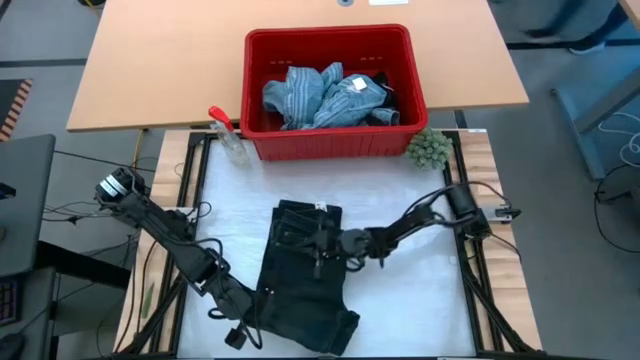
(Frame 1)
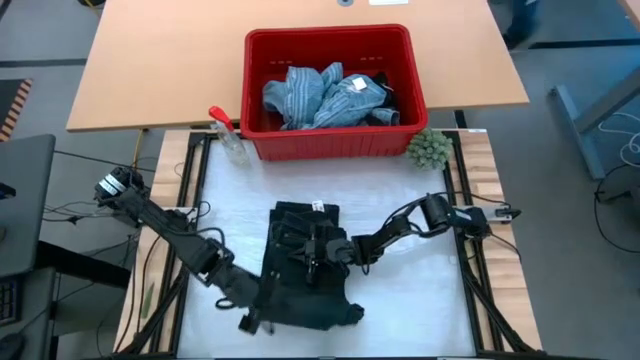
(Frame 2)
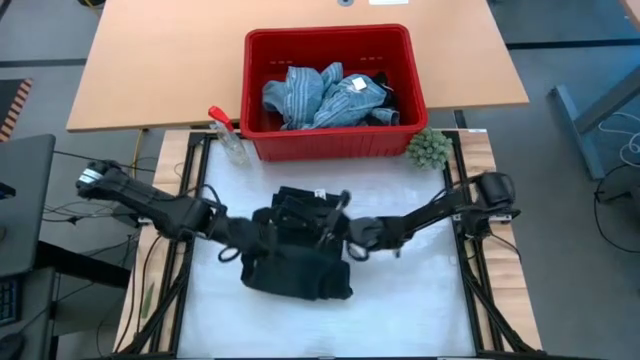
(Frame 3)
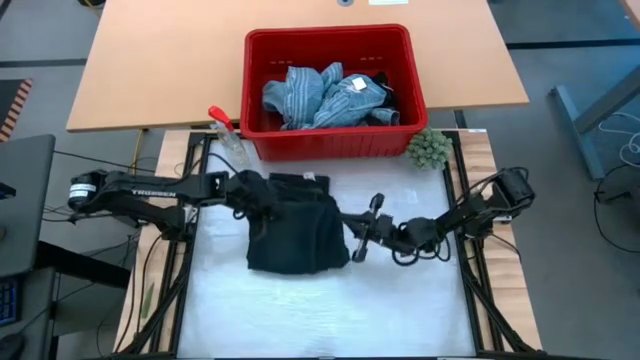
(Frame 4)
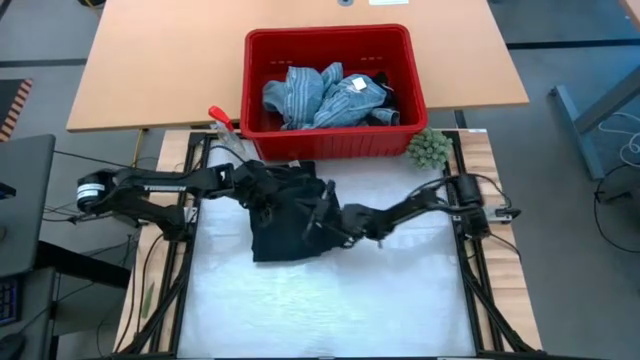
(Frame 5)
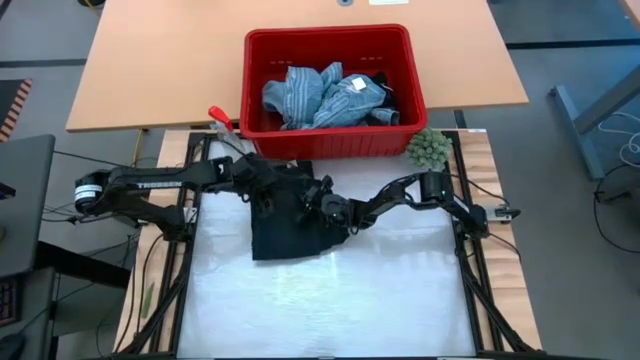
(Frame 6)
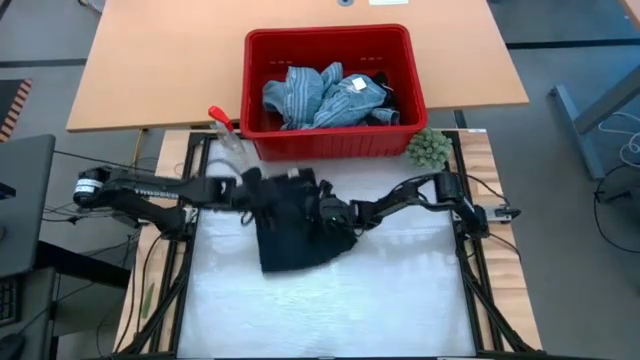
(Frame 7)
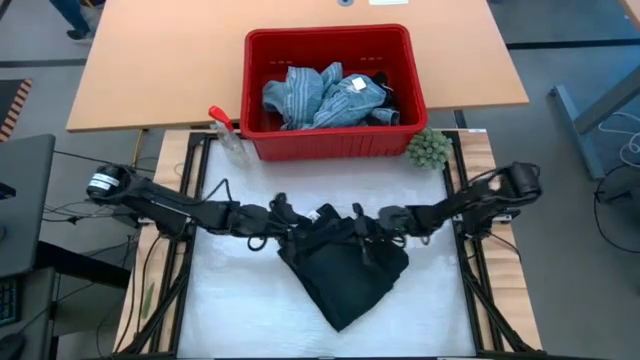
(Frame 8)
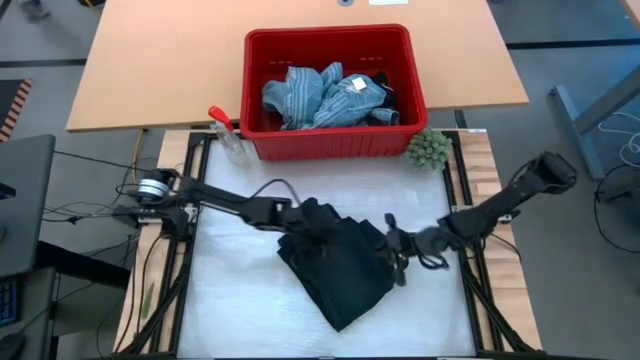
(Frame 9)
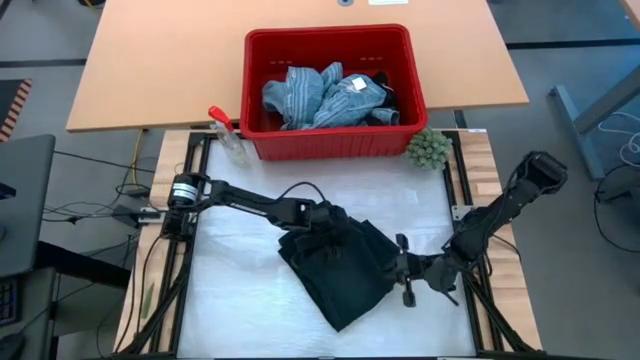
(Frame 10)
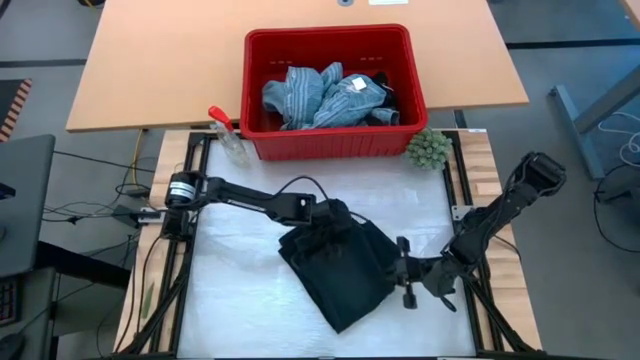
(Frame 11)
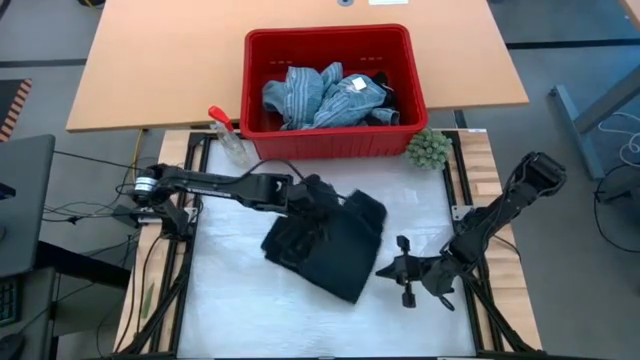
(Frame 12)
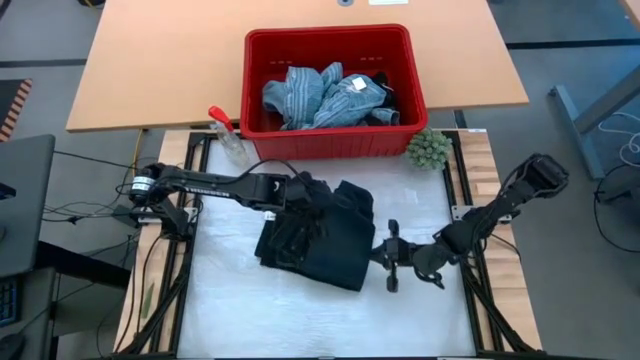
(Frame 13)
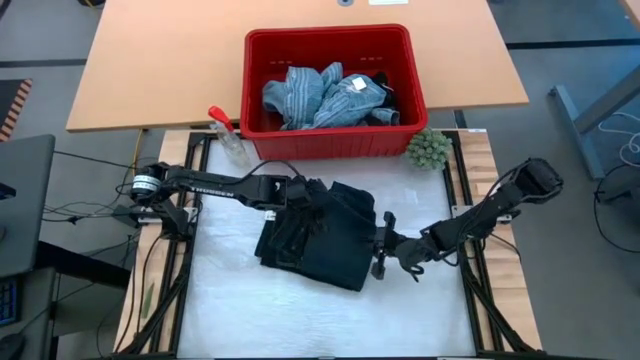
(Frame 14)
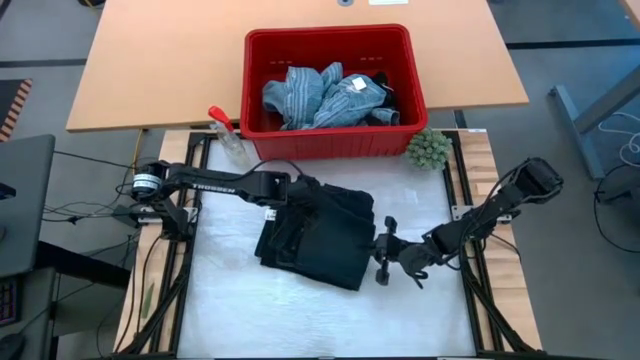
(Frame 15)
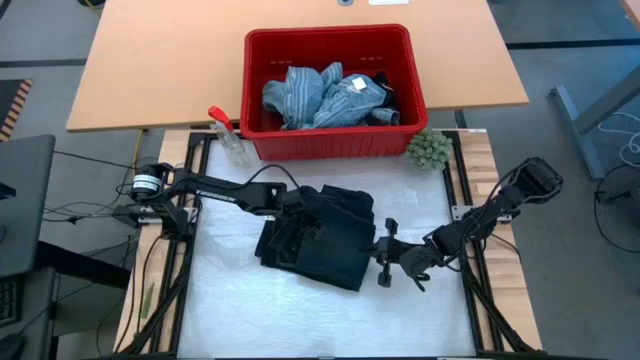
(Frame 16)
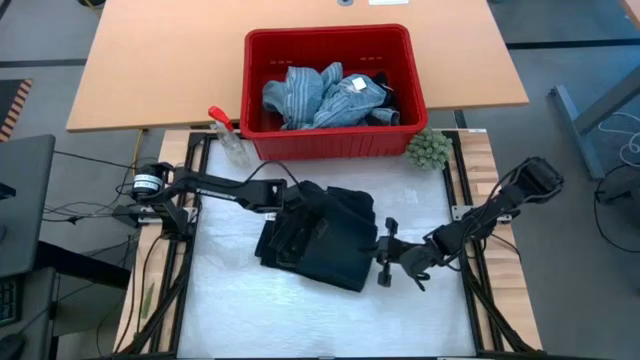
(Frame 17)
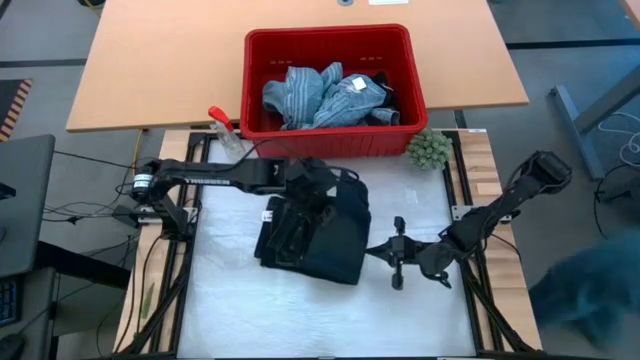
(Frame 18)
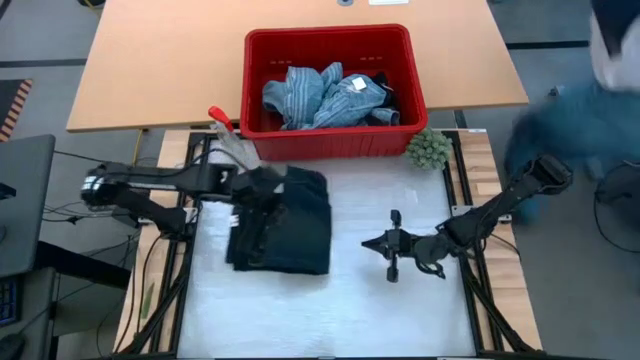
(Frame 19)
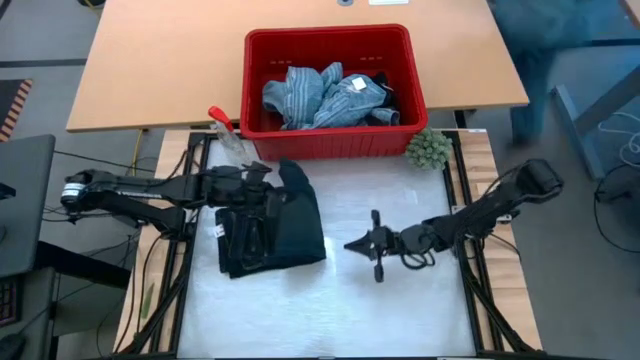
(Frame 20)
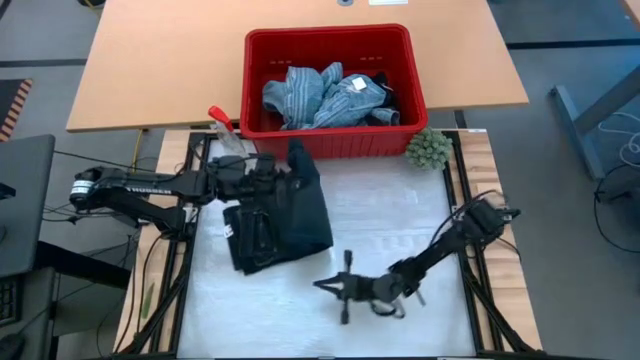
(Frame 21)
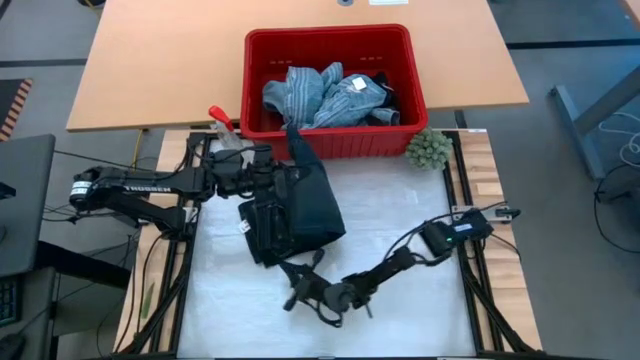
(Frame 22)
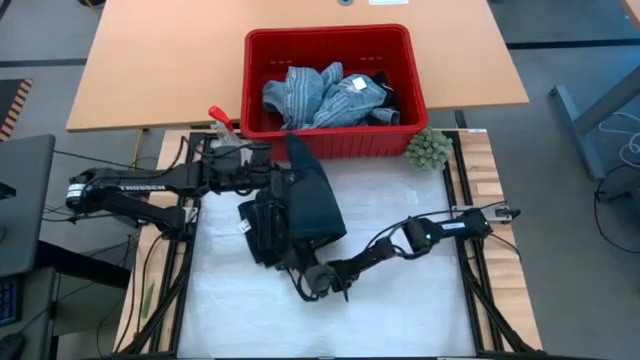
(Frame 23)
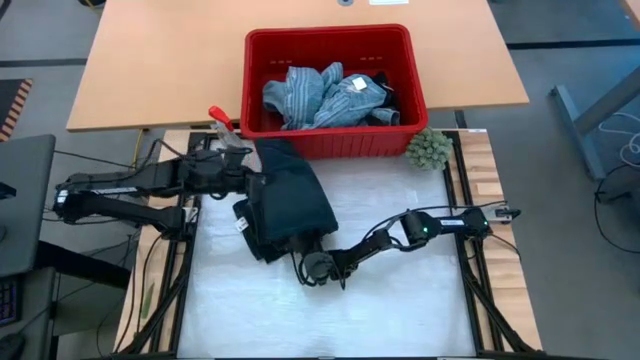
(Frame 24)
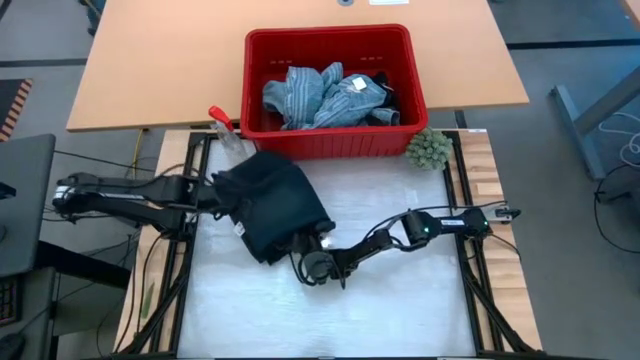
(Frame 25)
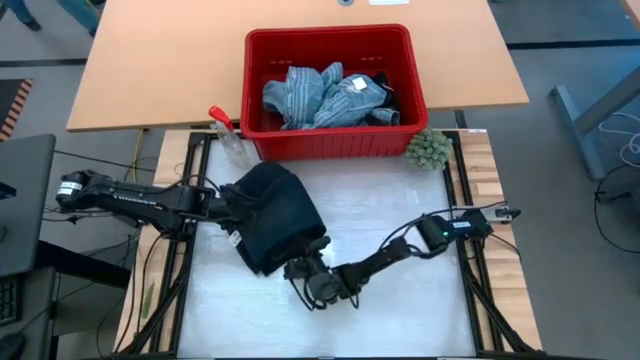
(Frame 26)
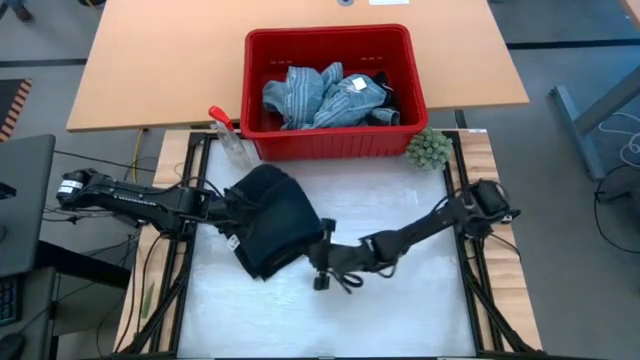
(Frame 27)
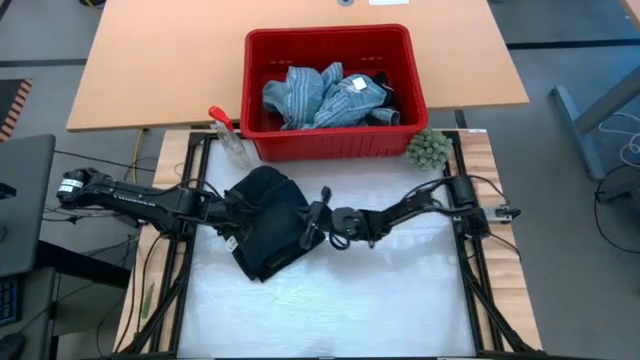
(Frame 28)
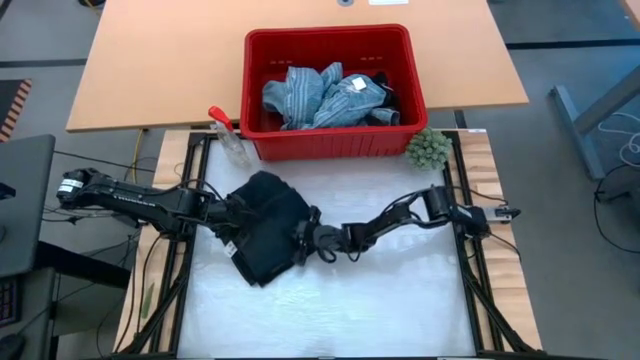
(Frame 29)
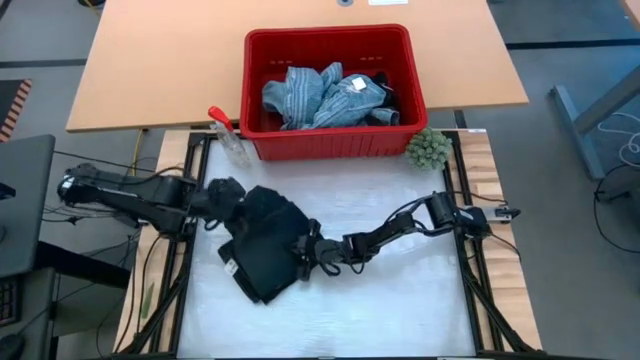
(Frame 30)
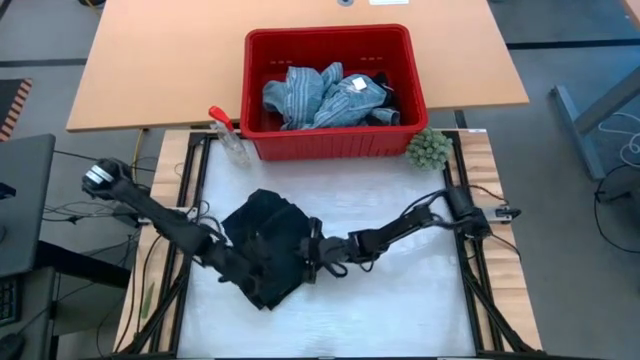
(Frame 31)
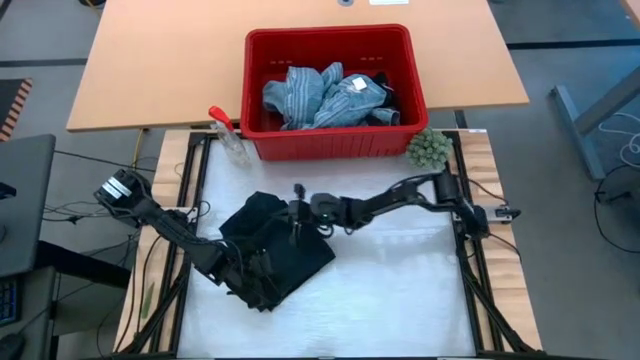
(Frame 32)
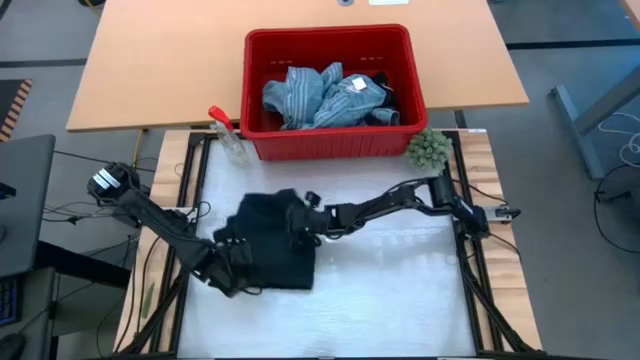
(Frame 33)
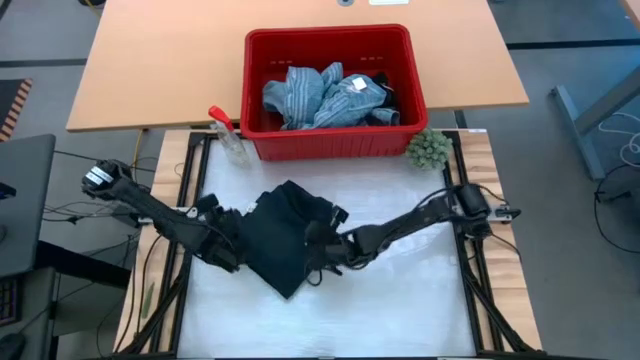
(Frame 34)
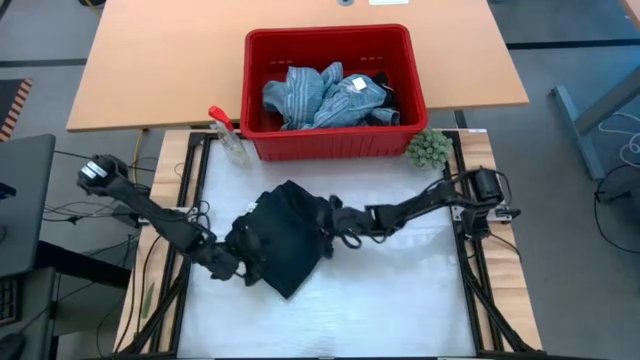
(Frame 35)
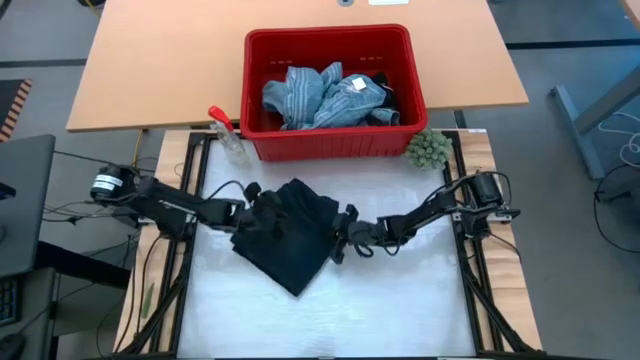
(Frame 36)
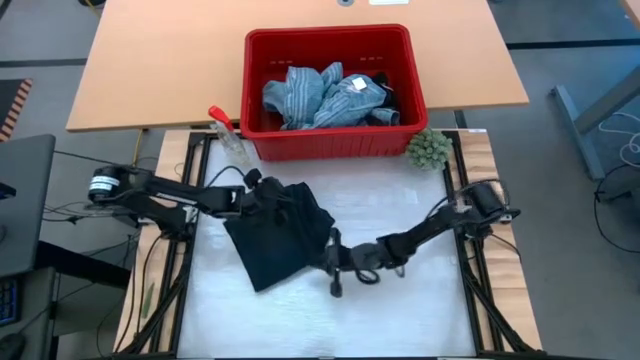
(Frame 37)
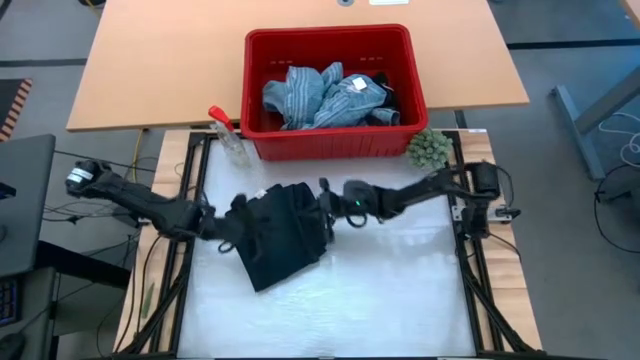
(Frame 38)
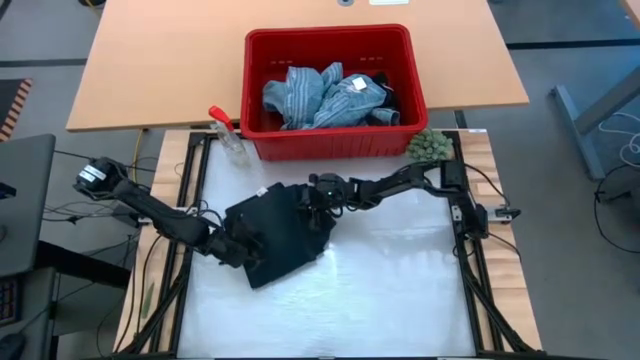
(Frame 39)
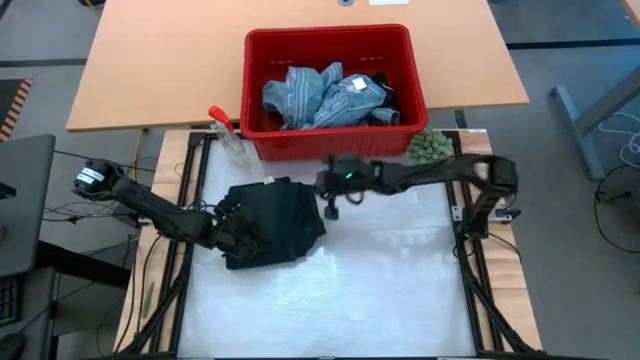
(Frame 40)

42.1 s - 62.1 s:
Task: Fold Laundry from Bin
Fold the dark blue pants

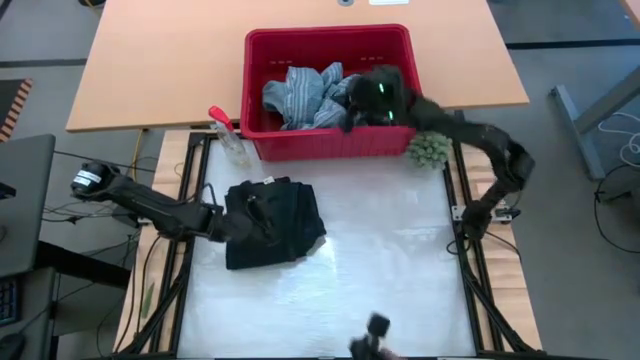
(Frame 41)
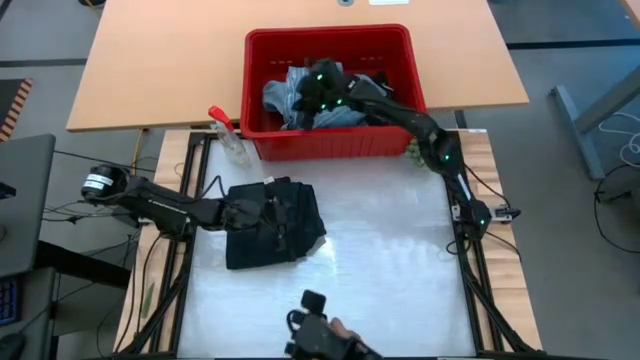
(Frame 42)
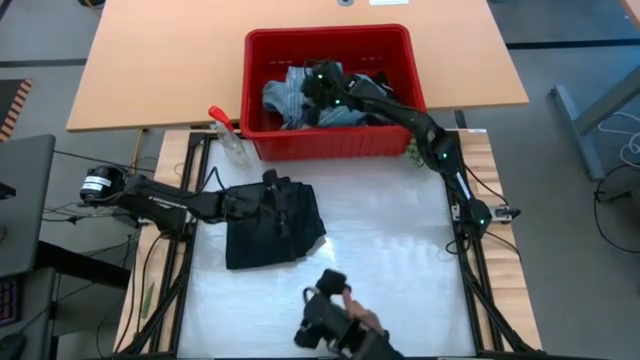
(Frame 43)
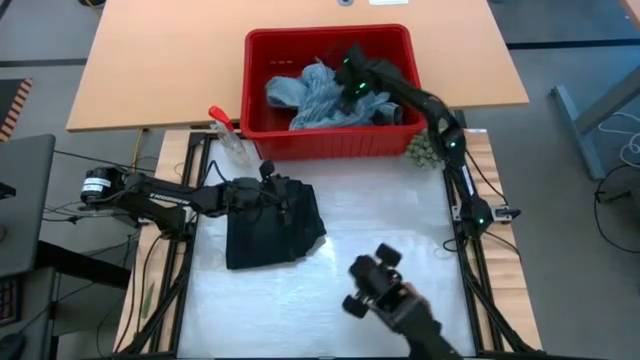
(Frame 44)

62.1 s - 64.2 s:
Adjust the light blue polo shirt in the red laundry bin

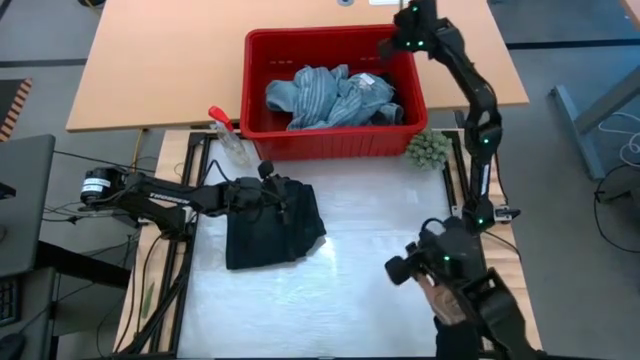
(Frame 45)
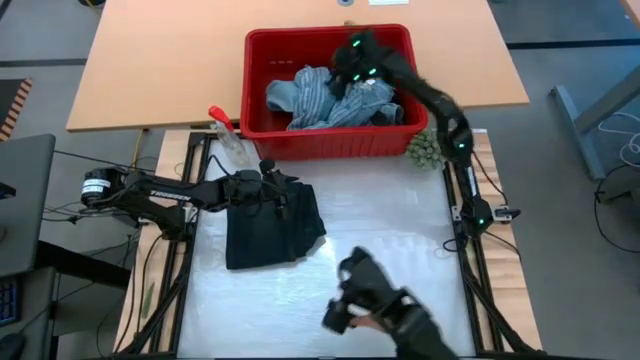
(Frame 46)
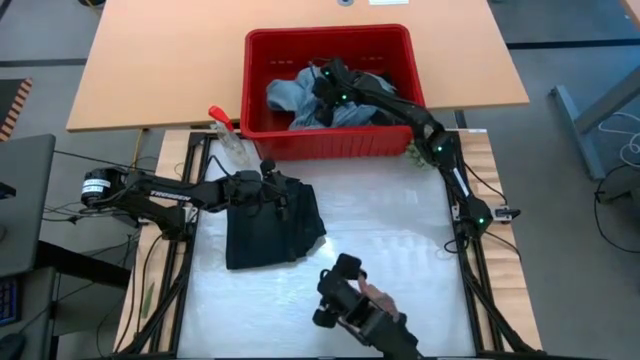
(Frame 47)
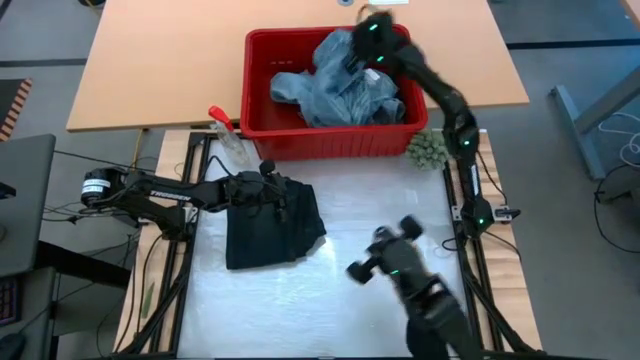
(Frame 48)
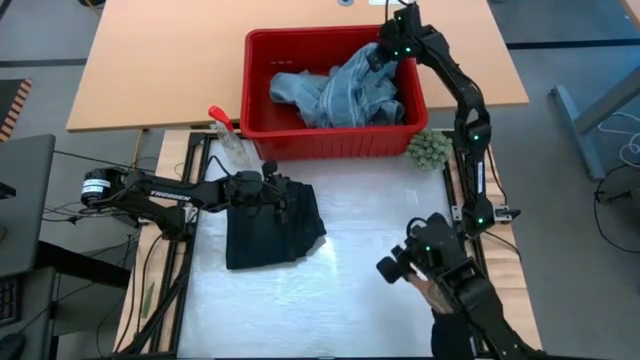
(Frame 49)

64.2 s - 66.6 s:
Adjust the light blue polo shirt in the red laundry bin
